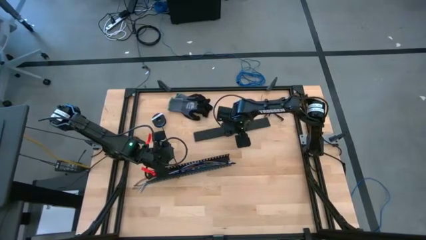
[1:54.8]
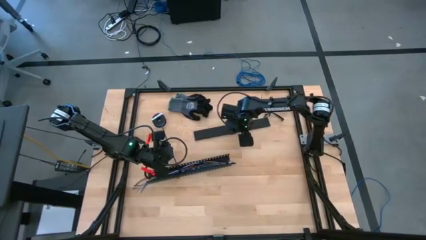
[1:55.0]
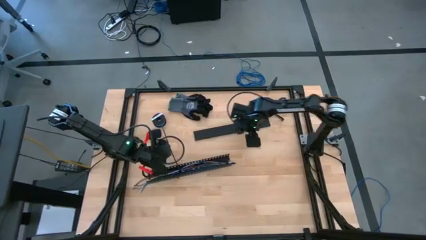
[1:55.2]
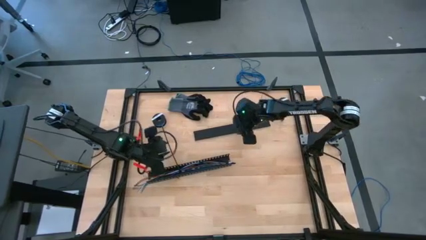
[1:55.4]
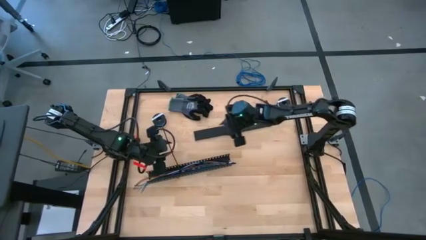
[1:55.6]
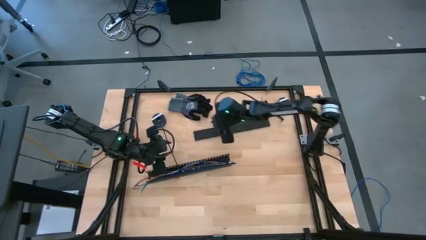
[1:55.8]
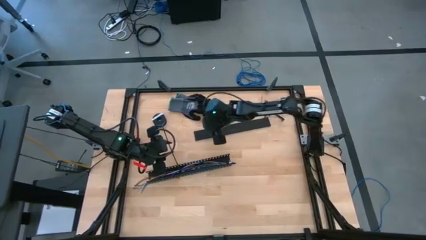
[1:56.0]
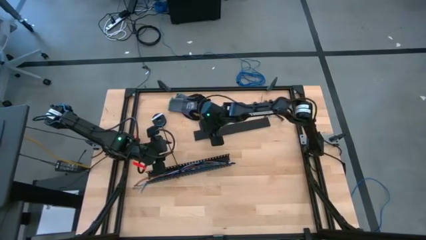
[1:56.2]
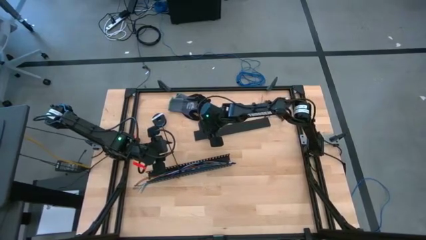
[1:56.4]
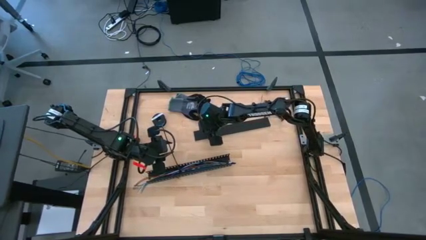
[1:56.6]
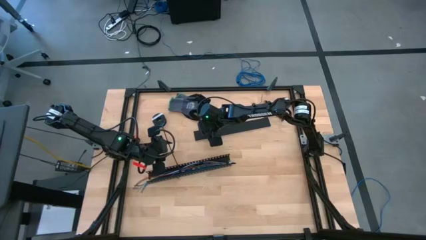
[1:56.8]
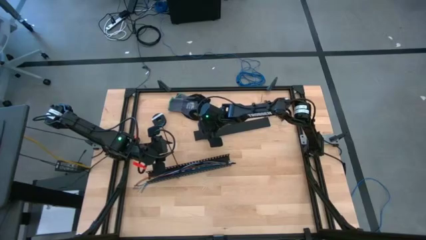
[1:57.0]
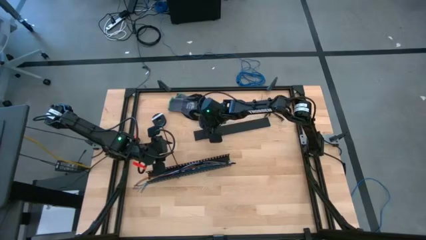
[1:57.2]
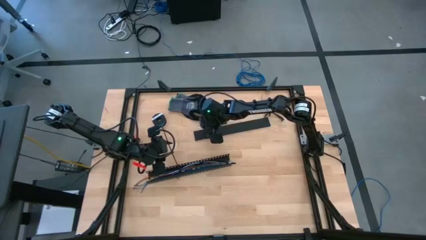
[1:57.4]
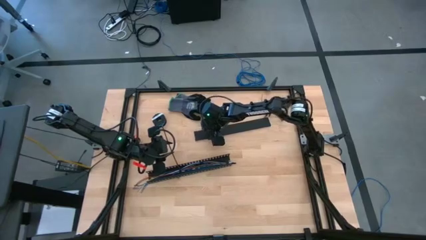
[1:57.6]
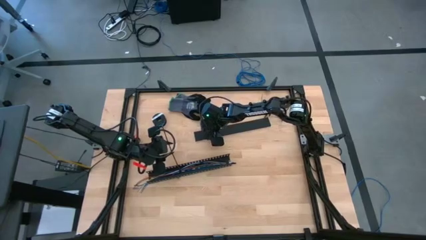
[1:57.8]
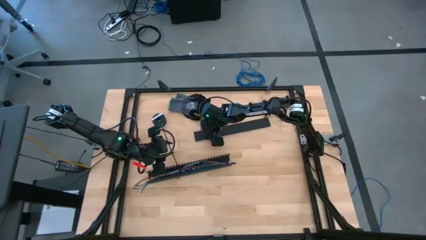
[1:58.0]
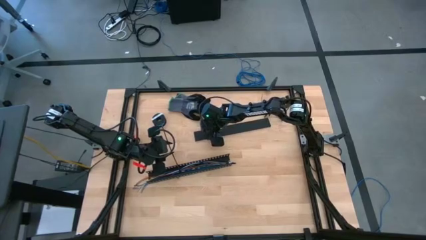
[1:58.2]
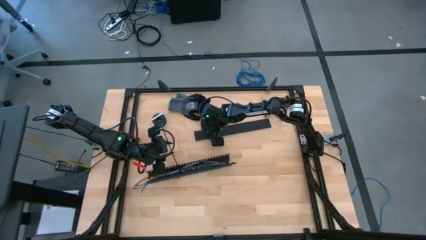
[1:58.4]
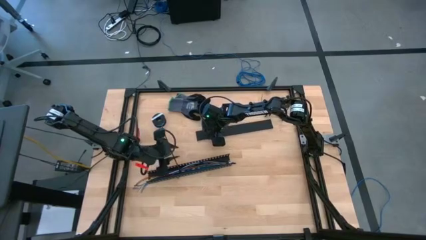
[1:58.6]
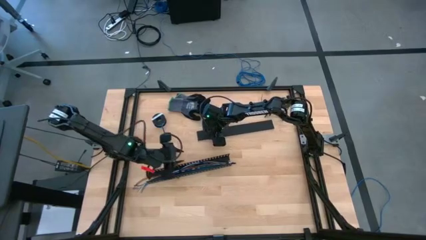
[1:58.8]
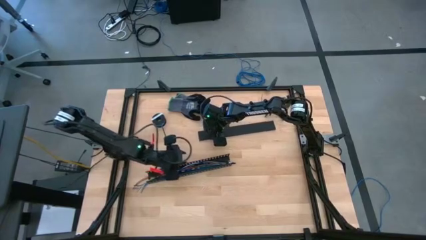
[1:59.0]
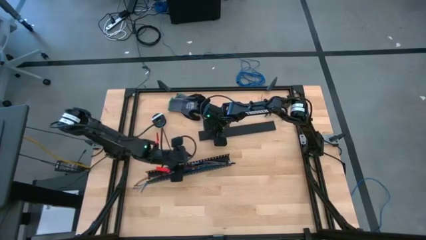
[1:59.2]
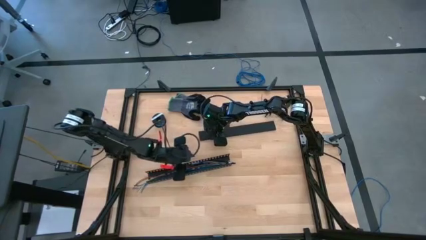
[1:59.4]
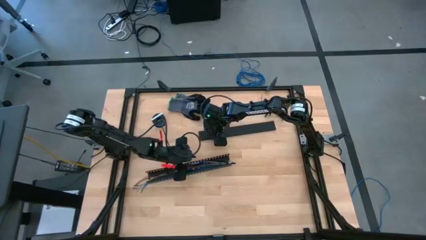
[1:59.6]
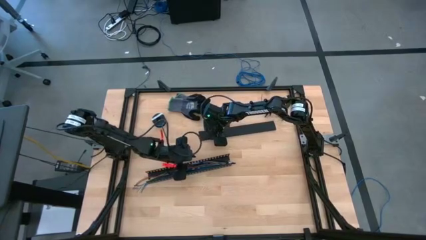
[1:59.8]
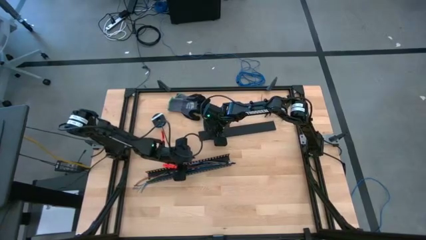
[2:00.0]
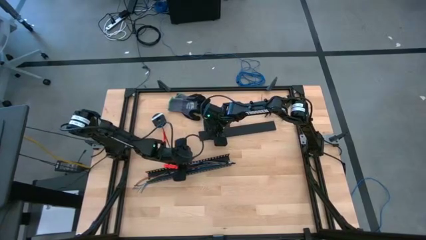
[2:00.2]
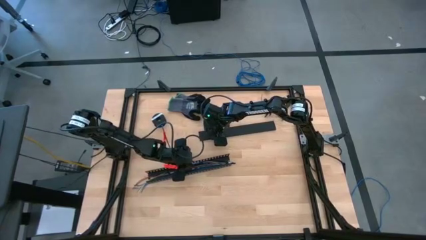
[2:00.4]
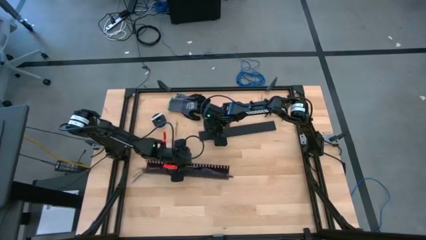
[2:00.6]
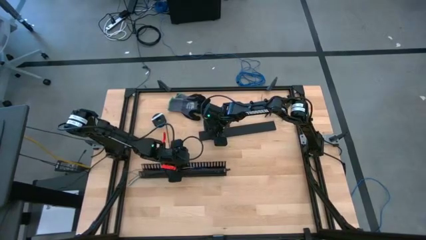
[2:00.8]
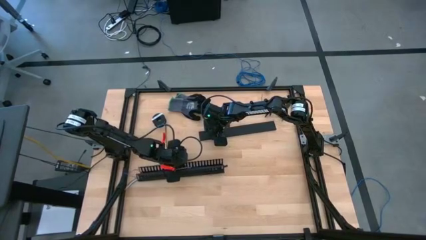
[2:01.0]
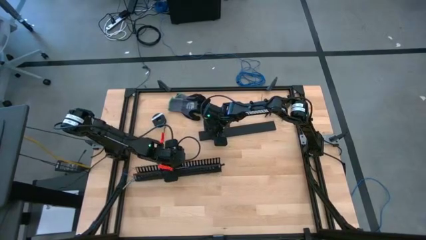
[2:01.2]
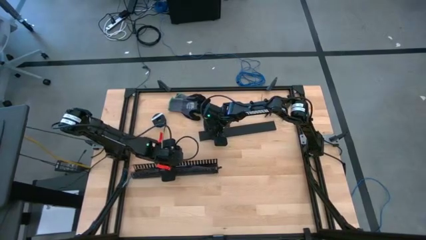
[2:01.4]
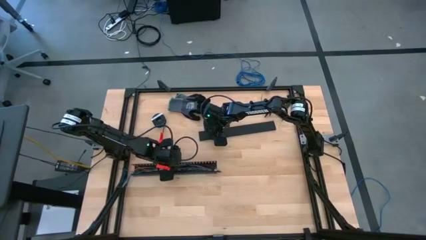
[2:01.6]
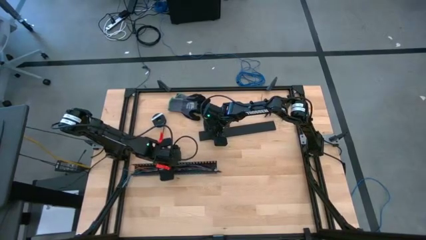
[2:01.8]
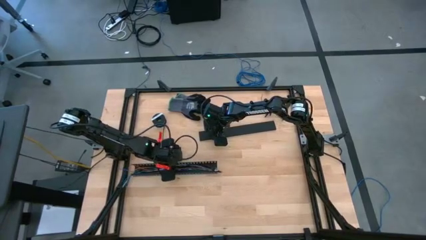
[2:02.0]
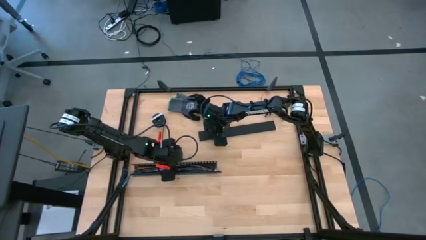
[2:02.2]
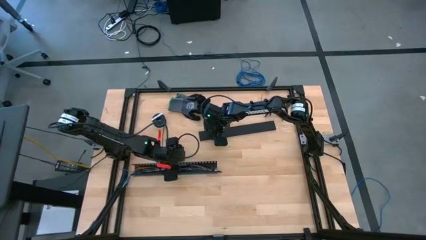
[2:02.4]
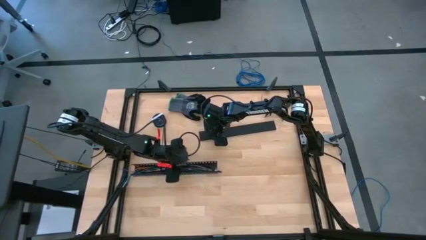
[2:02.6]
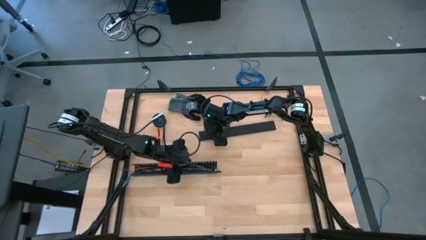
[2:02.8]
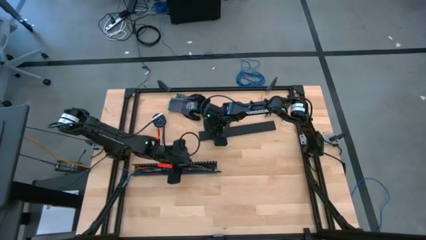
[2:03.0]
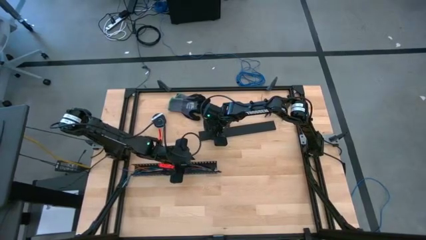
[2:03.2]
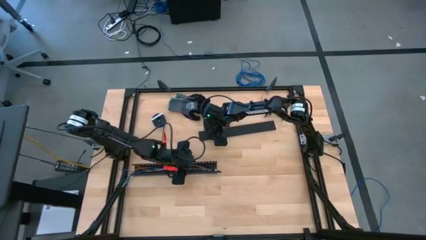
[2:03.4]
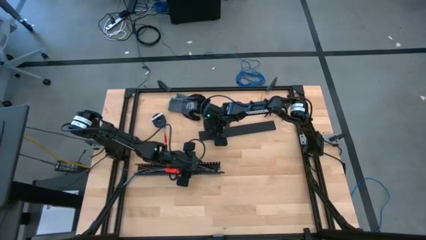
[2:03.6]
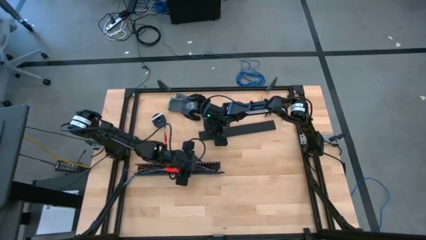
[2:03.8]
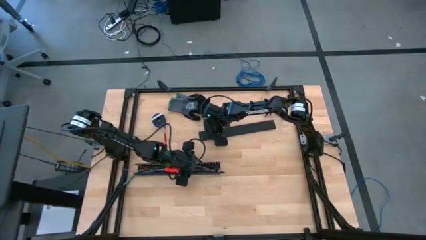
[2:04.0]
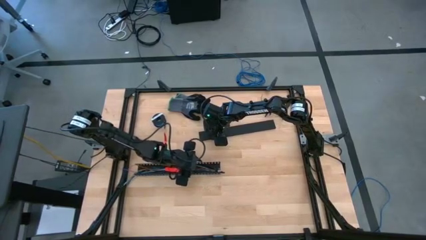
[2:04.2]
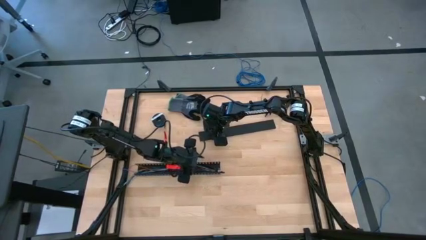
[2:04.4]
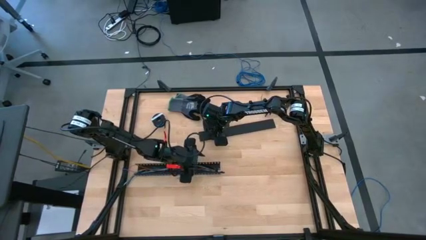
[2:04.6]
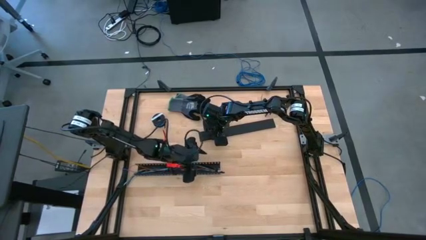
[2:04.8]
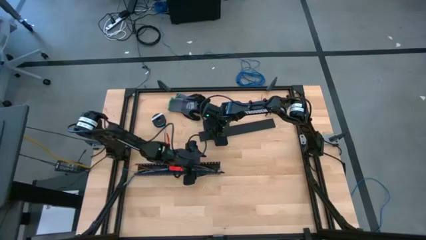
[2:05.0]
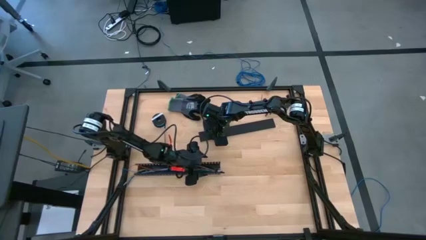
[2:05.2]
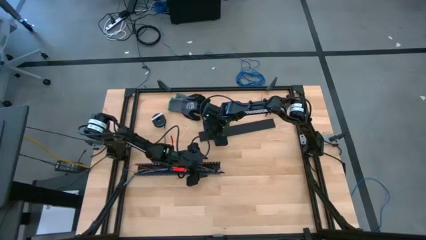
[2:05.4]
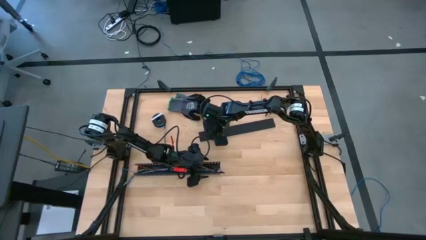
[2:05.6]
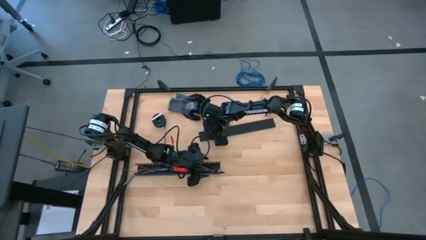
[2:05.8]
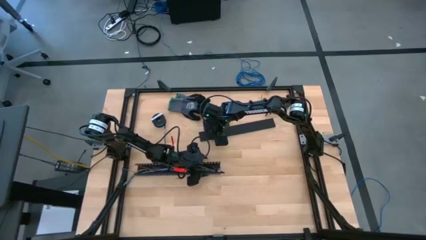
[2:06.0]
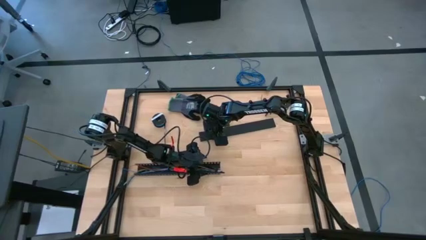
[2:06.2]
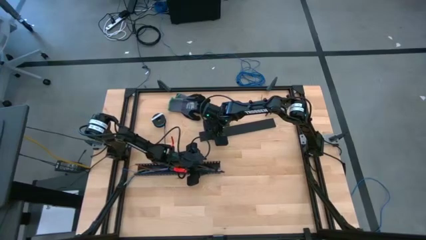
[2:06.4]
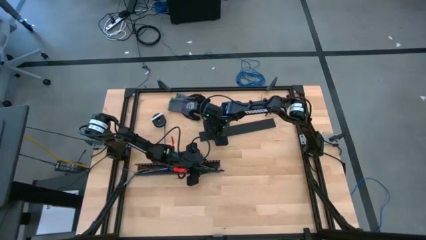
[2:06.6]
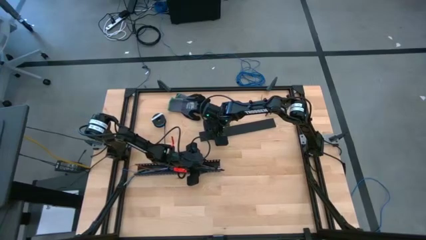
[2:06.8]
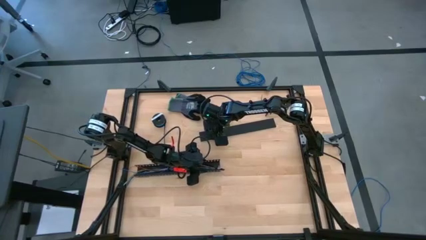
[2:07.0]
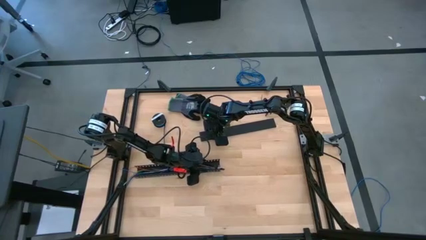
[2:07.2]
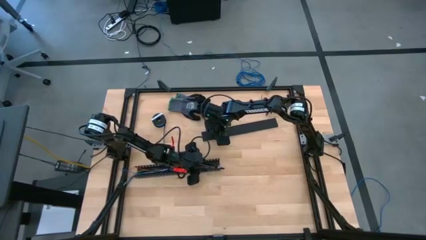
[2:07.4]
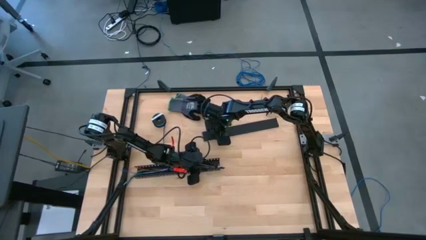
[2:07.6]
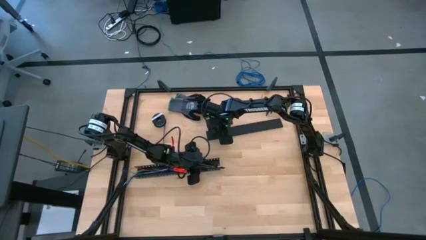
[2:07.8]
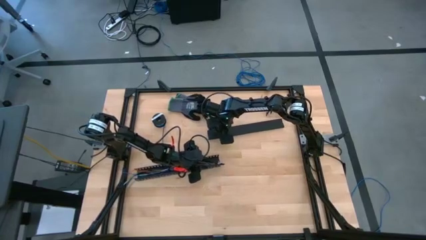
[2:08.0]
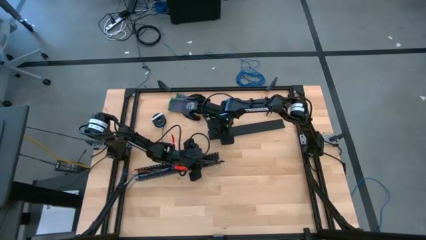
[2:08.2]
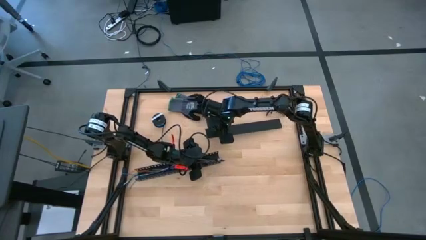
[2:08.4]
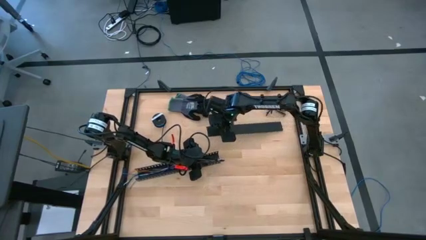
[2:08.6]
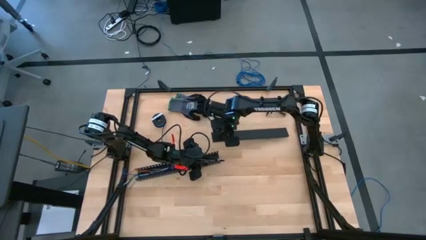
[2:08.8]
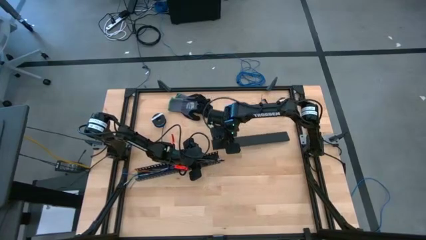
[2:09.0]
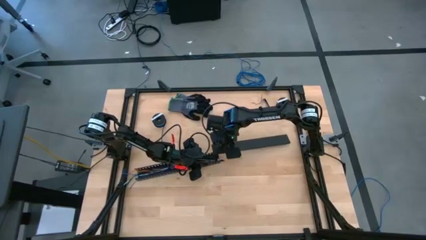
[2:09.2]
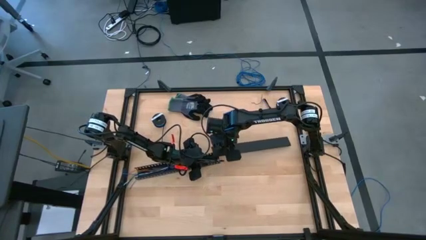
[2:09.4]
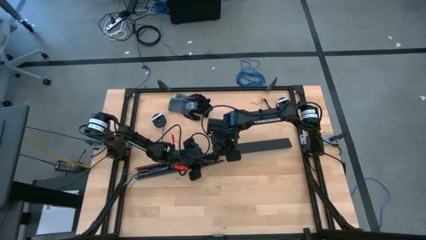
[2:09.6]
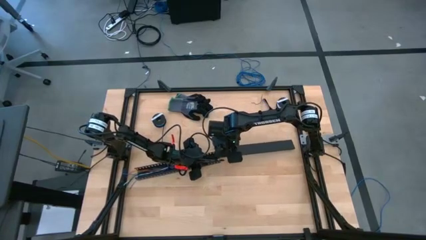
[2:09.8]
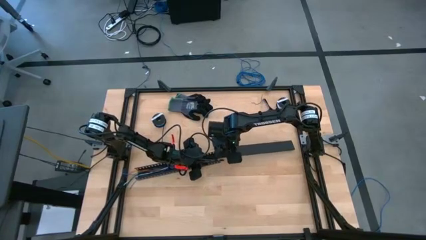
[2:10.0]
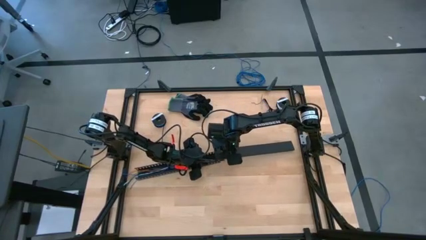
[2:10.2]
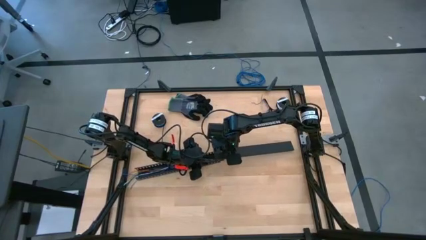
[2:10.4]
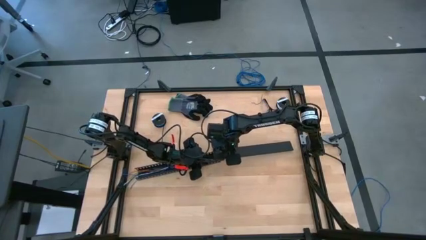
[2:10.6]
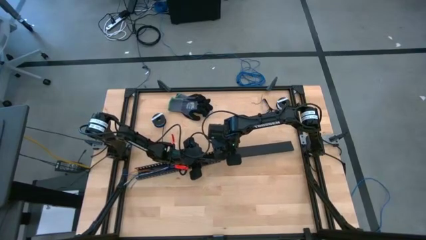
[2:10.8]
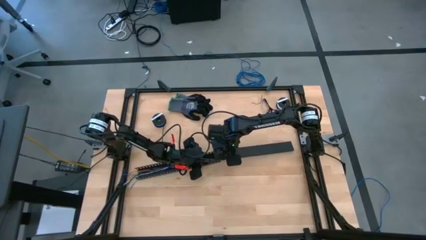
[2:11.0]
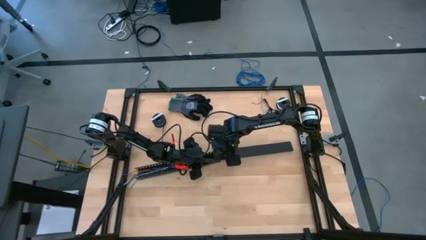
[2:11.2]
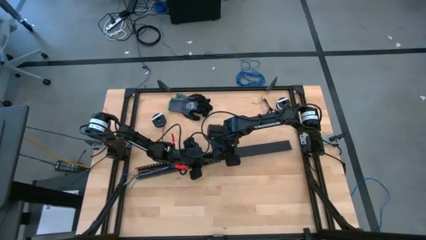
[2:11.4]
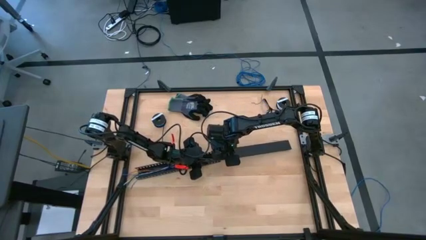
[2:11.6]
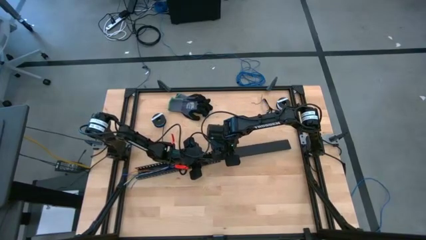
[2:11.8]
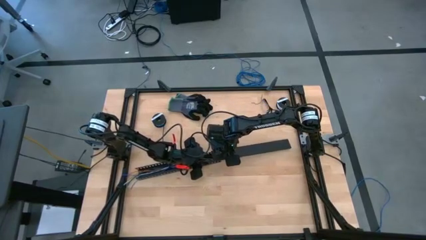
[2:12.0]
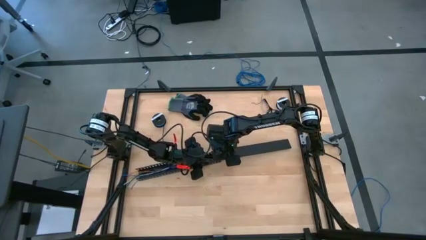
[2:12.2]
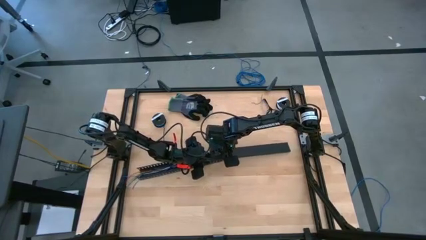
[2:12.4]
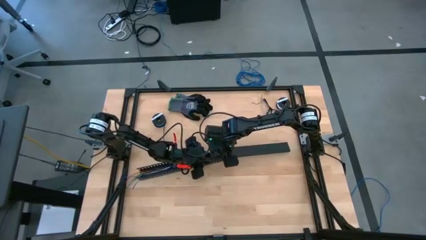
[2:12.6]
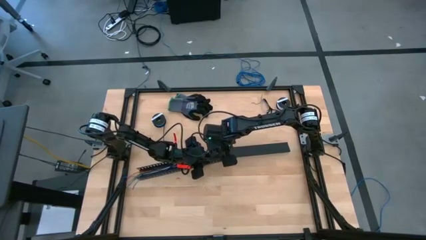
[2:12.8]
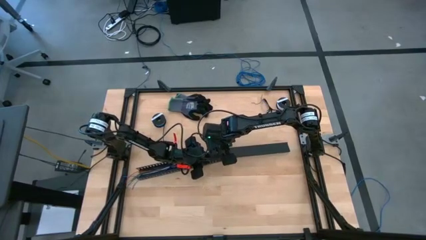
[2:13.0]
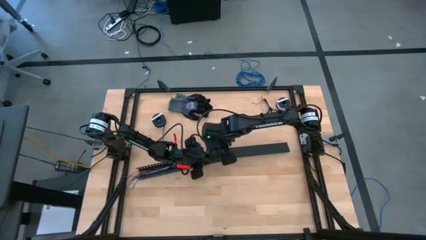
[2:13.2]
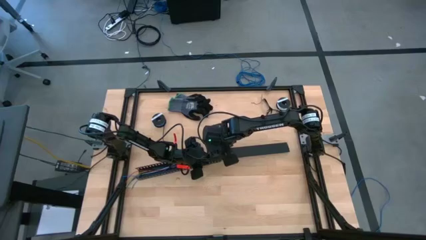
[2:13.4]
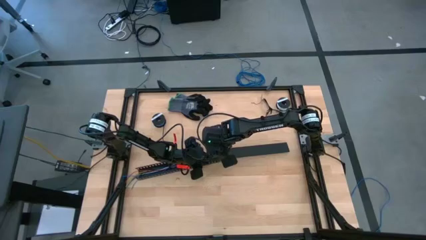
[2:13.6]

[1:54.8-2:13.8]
Task: Ziptie cables
Close the black cable duct with the cover
